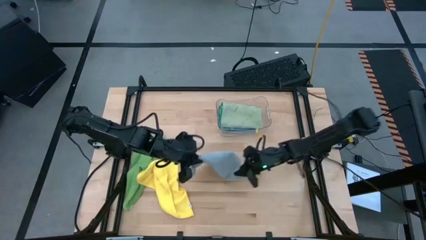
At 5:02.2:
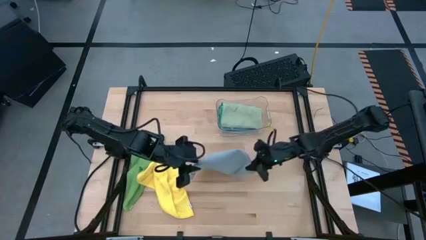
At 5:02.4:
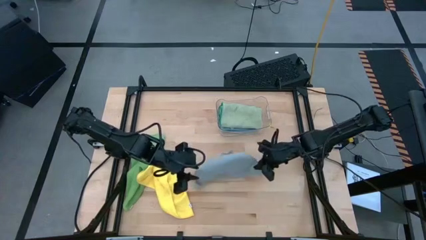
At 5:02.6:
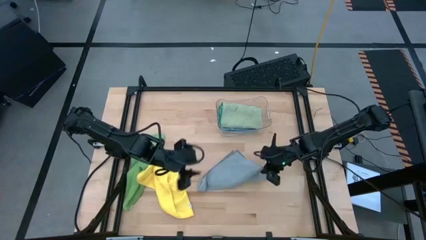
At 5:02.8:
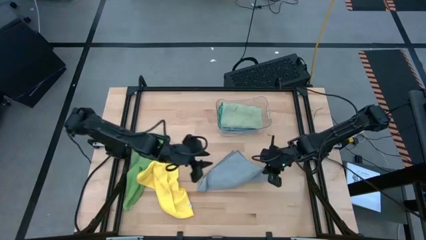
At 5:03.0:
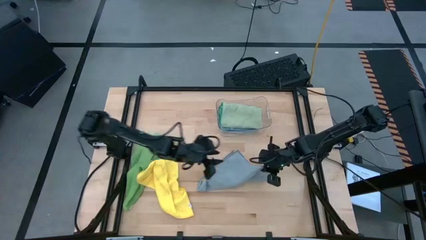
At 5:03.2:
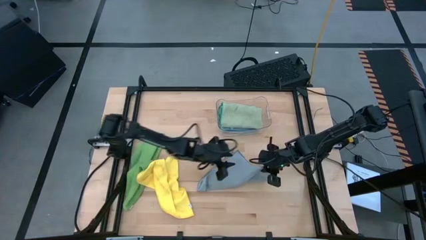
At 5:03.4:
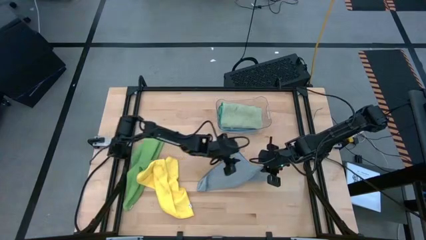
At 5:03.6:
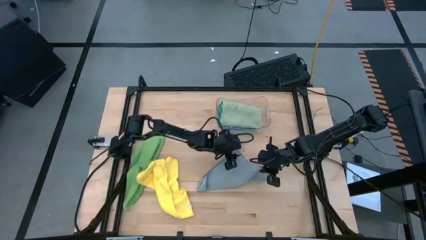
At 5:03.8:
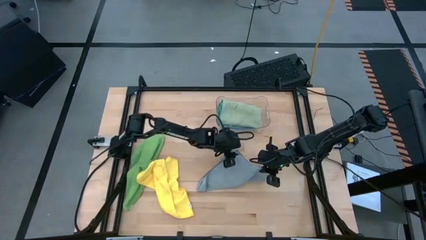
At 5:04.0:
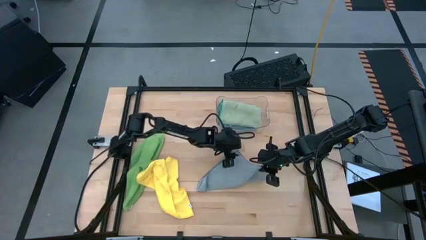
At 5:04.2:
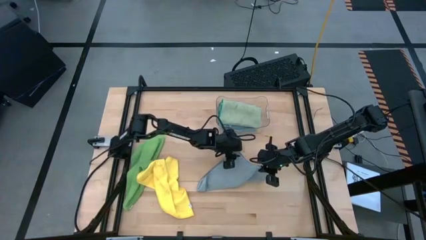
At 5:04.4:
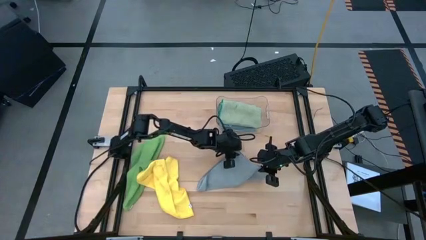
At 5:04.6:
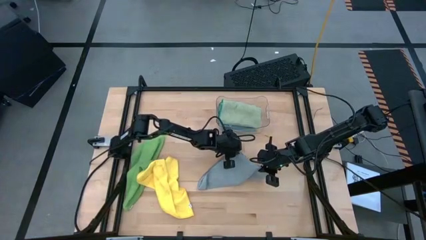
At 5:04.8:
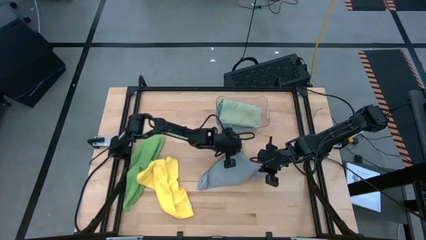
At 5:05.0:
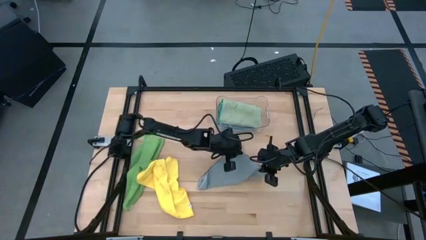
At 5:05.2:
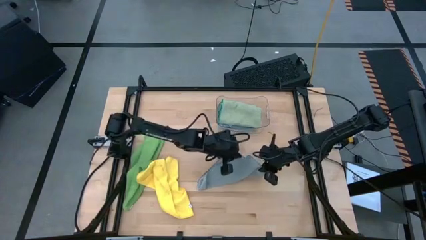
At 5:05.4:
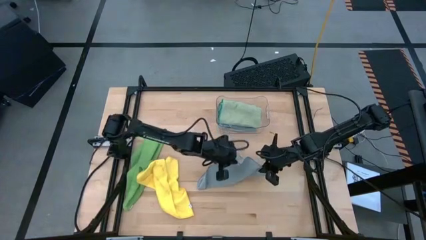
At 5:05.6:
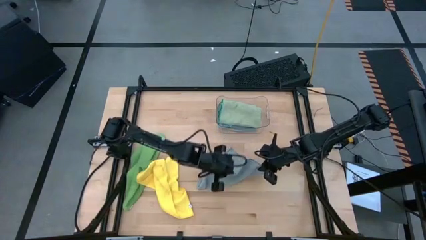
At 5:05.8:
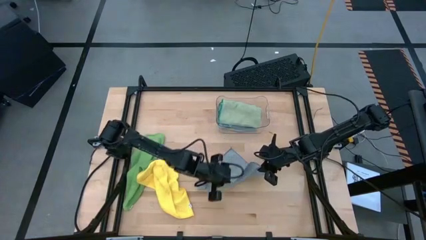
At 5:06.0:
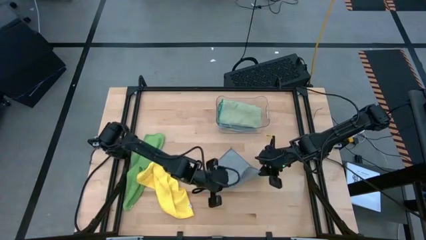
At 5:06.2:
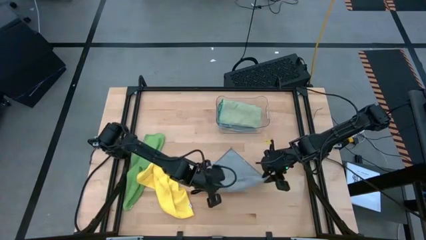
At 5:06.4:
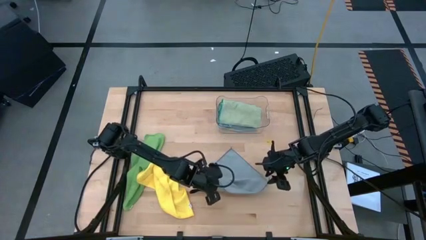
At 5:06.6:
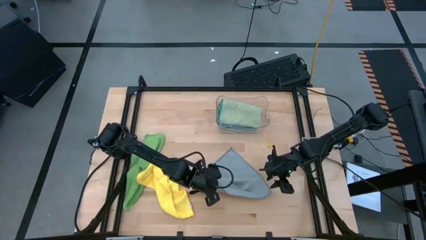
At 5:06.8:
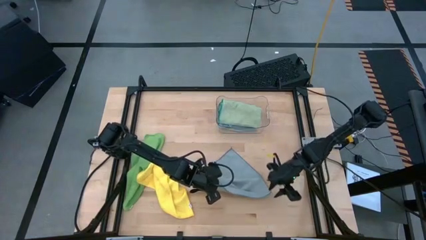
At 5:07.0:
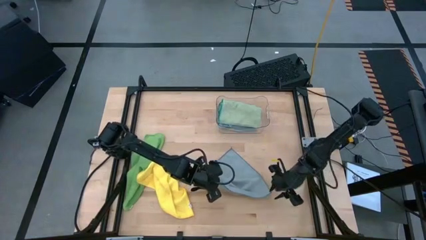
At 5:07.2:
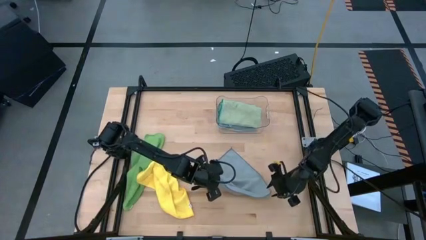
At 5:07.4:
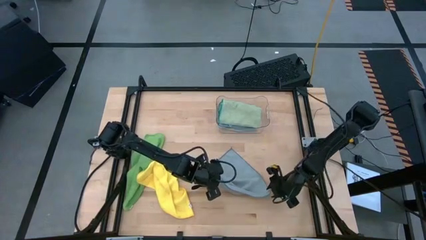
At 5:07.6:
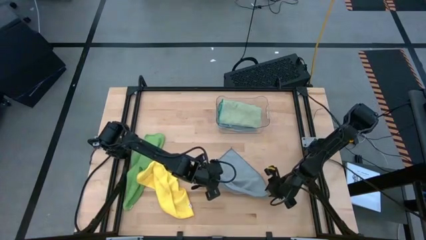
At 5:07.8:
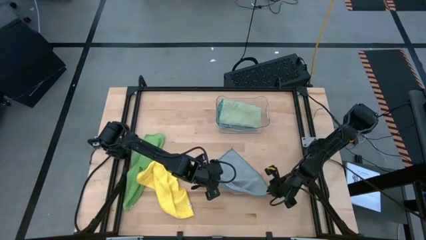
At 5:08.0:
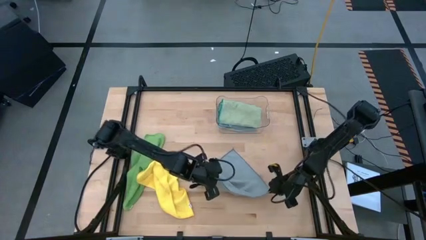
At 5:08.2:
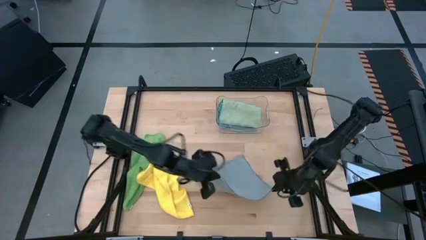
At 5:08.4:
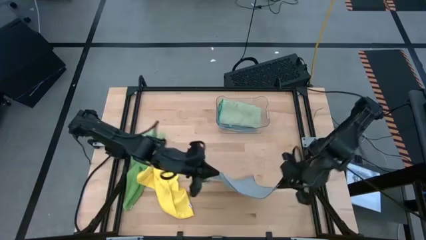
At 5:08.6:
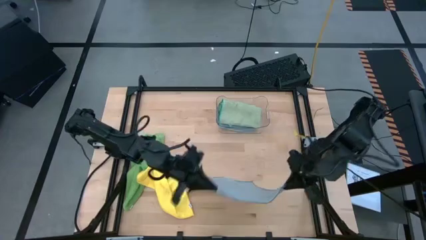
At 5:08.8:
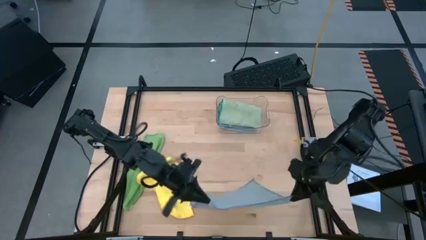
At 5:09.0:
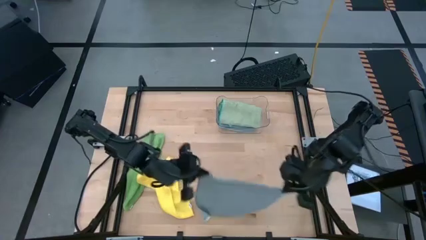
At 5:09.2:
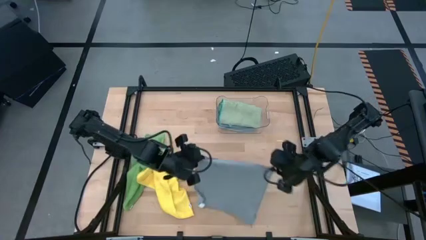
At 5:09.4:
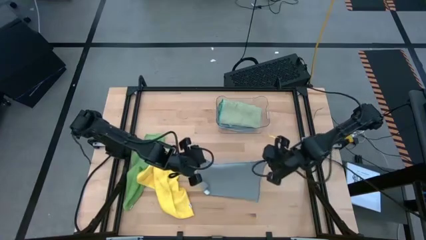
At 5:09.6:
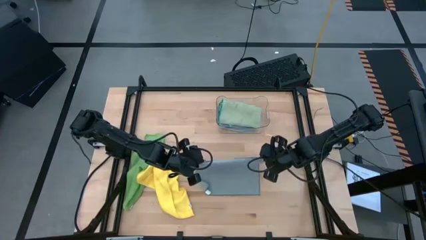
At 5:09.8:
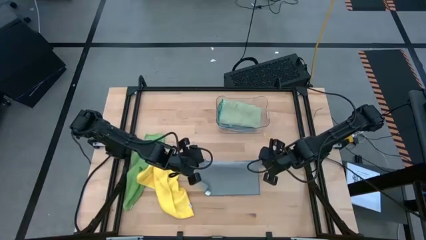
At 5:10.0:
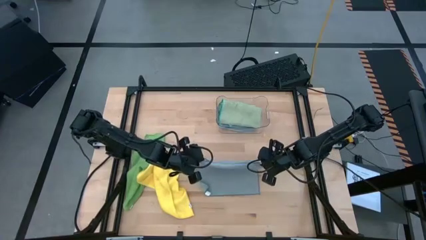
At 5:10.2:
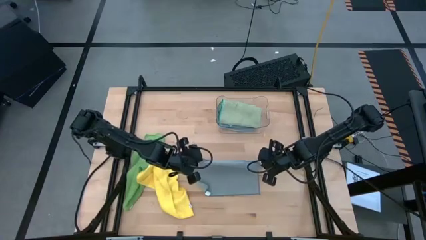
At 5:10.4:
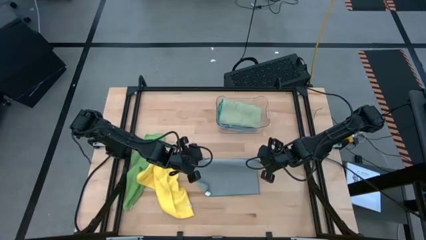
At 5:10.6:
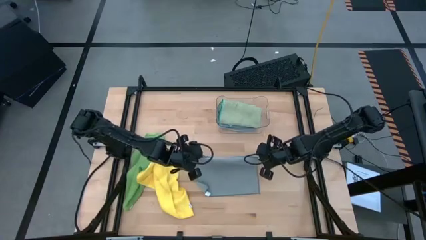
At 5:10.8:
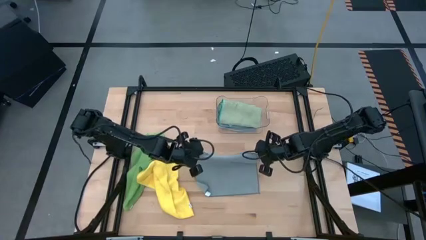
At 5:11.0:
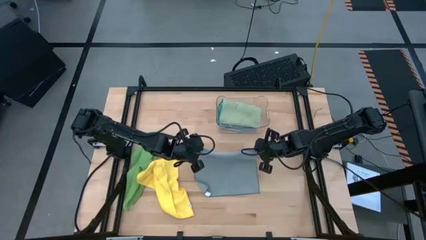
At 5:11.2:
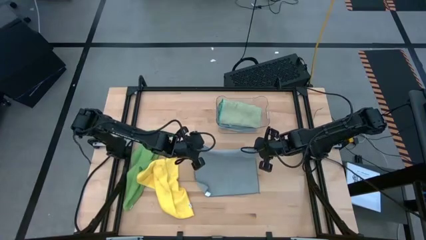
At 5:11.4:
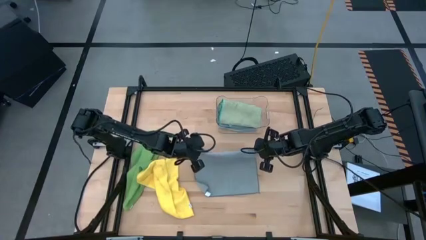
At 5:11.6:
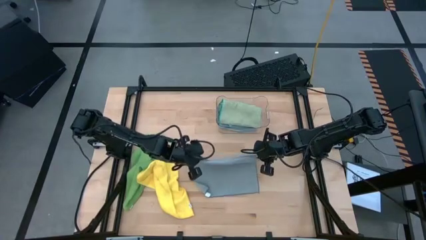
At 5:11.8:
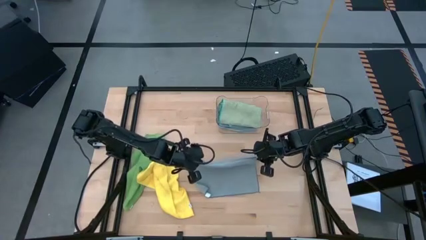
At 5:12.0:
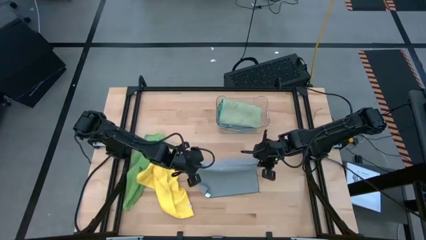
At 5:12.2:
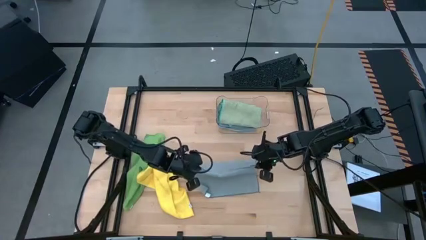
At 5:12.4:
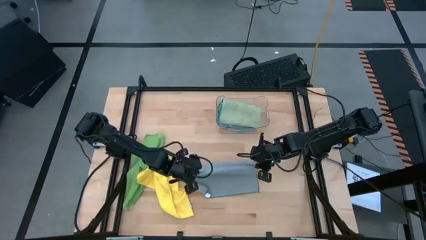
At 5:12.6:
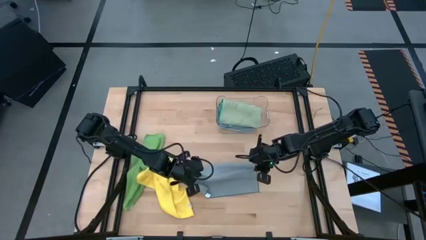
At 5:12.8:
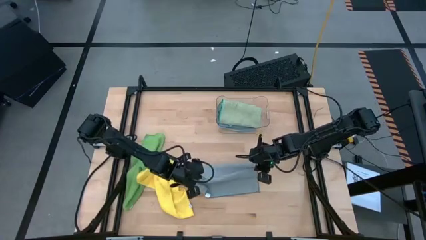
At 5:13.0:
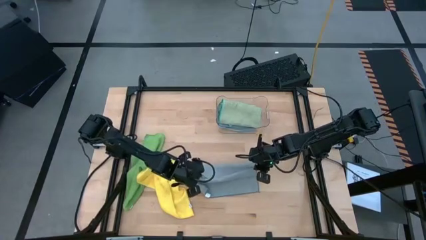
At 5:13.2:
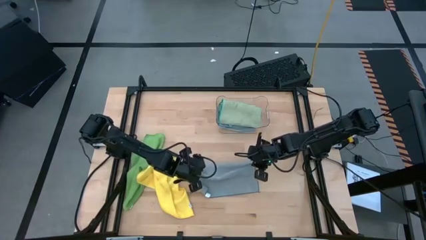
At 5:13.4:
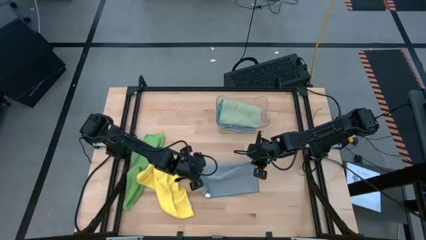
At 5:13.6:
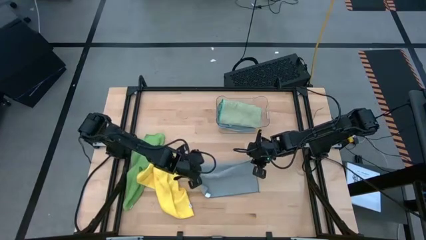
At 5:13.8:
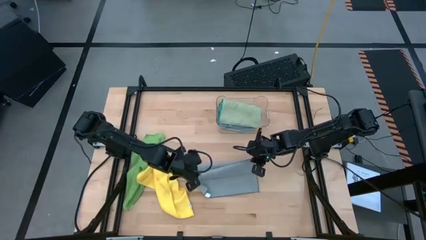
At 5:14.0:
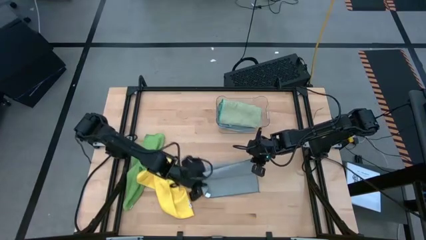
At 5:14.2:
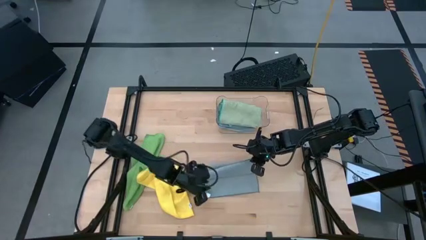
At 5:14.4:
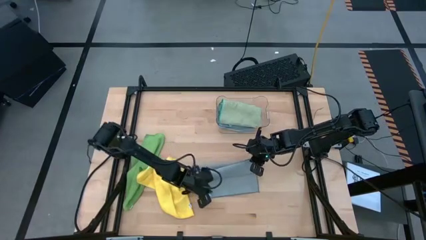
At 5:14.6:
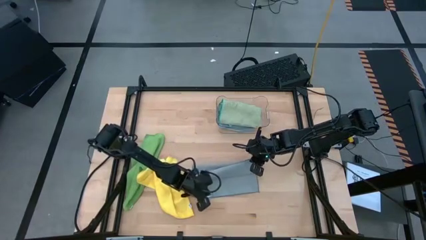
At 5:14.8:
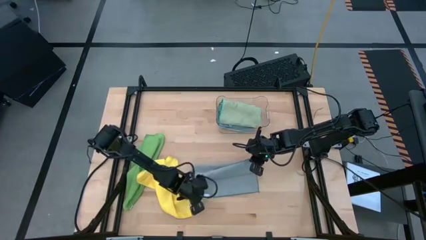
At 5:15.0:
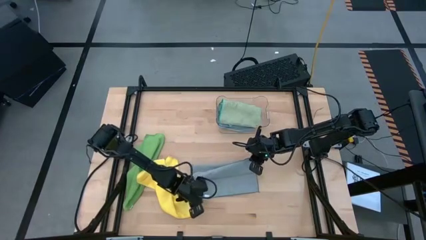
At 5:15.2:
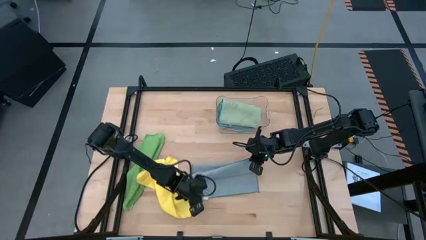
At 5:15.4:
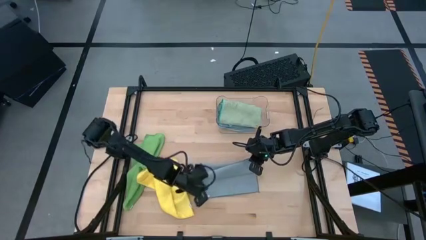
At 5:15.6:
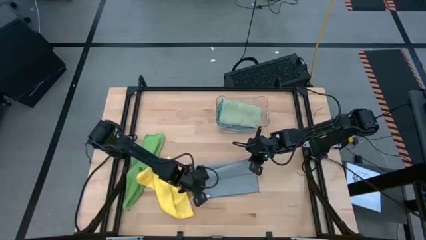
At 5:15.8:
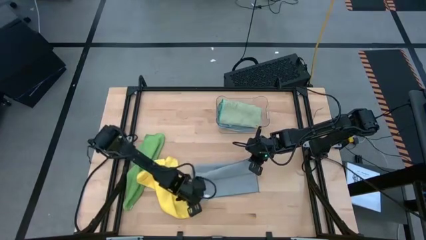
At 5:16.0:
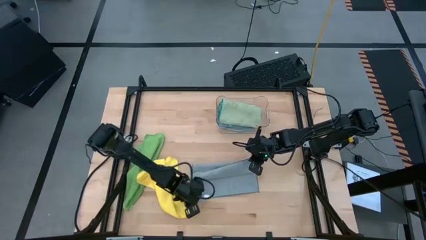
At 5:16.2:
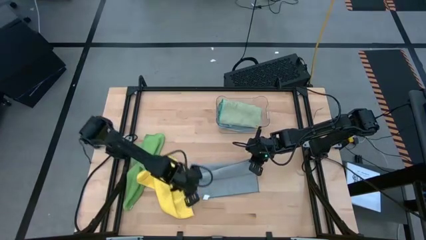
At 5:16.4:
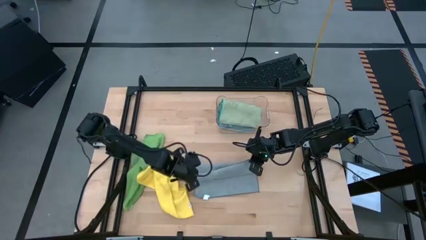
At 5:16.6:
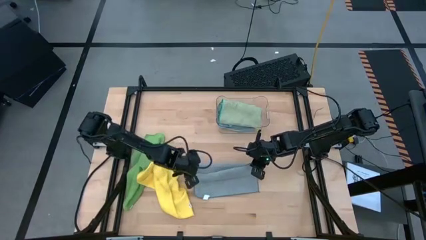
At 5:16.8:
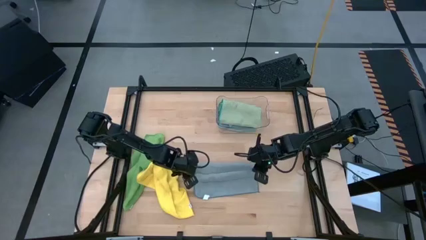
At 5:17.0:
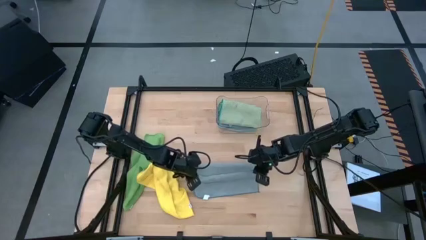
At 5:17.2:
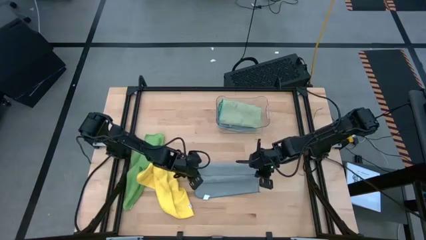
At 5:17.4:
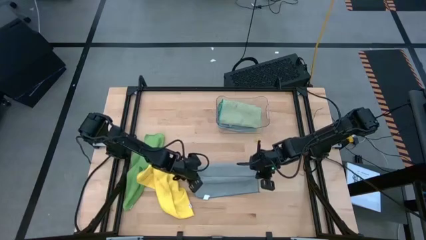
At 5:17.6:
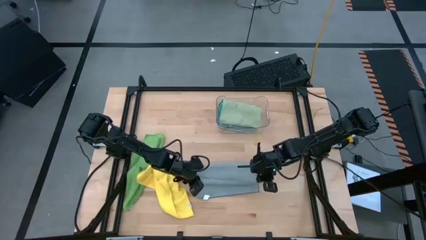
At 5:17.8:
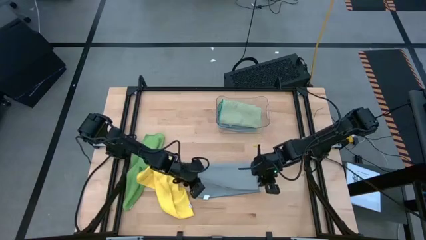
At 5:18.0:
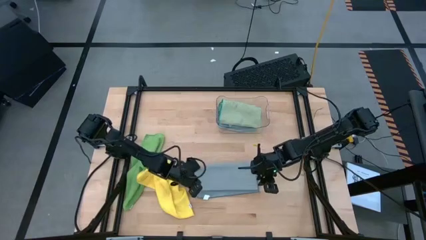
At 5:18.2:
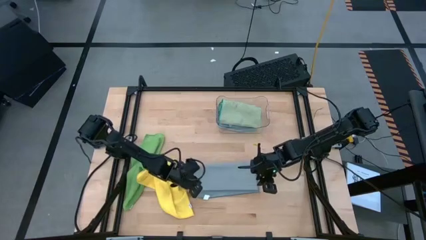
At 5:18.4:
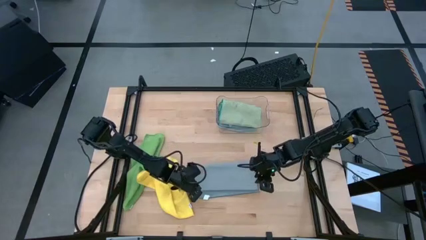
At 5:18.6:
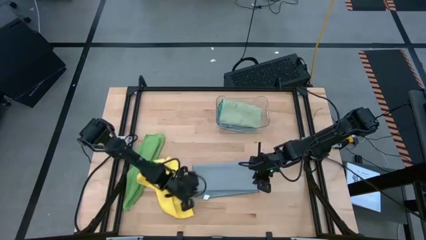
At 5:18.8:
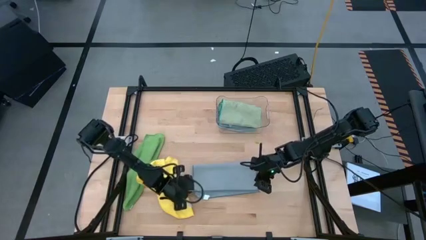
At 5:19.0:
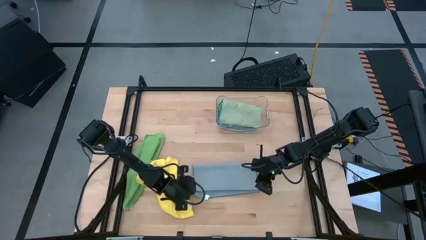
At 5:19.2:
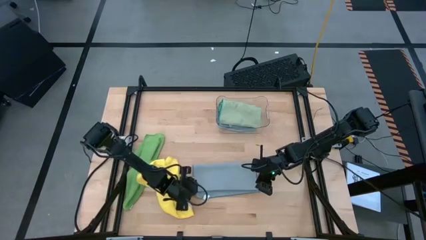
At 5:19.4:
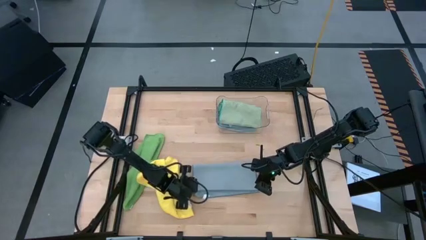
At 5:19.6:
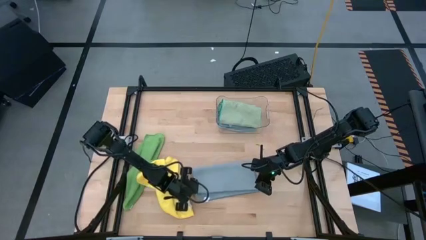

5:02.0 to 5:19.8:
Task: Fold microfiber towels
Fold the gray towel
